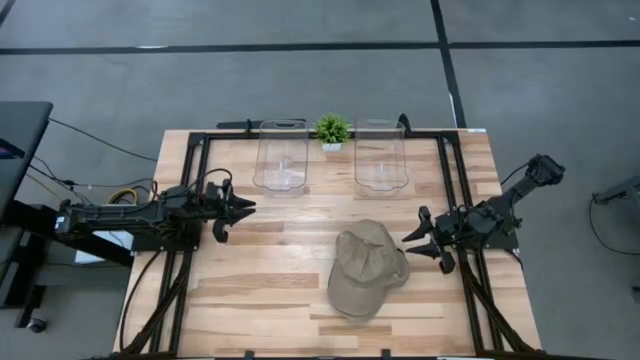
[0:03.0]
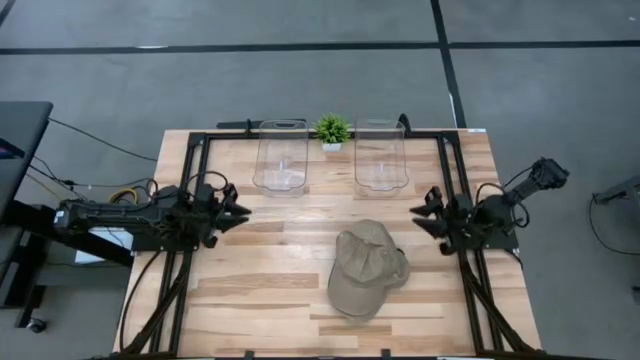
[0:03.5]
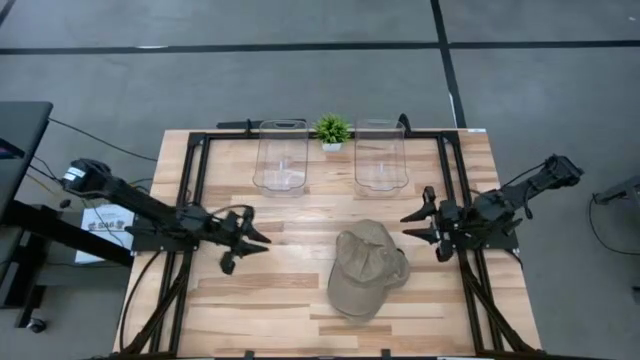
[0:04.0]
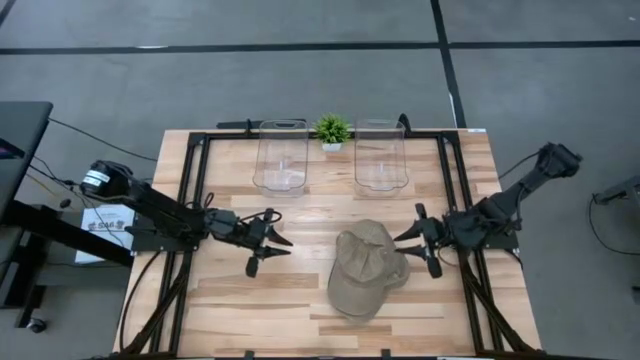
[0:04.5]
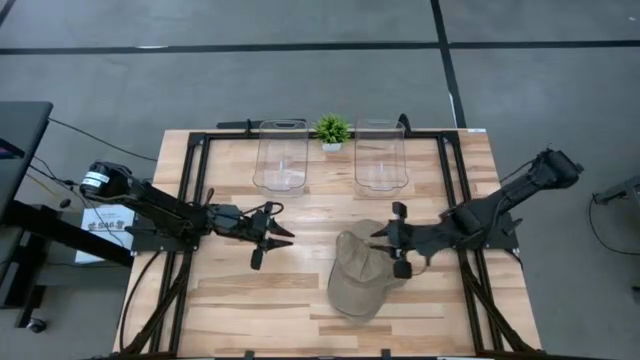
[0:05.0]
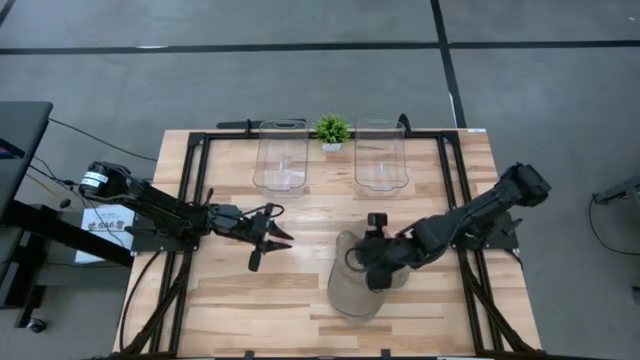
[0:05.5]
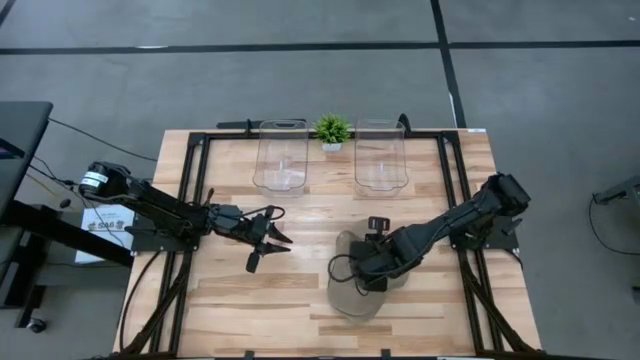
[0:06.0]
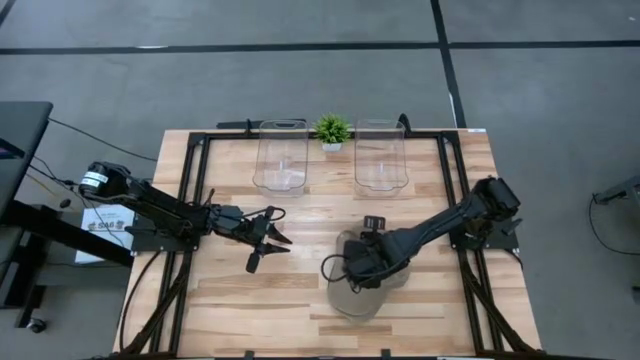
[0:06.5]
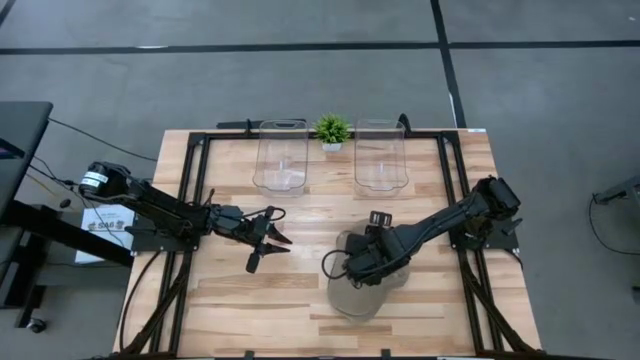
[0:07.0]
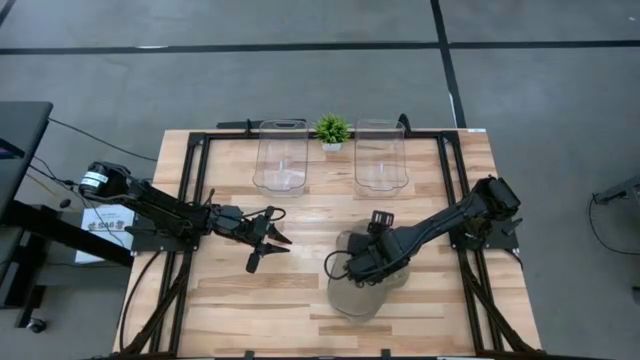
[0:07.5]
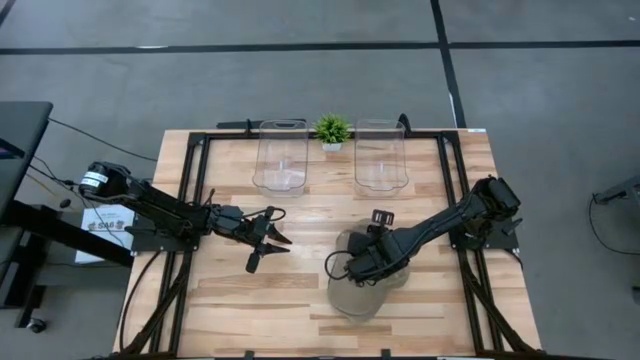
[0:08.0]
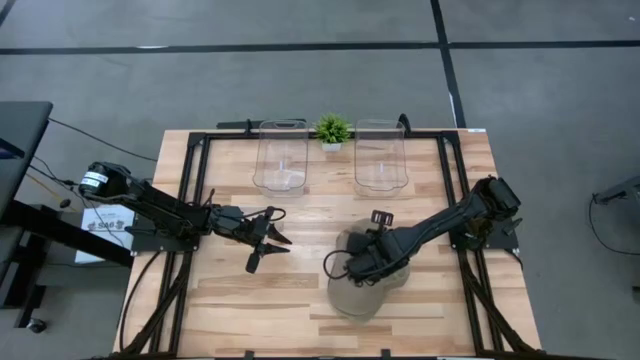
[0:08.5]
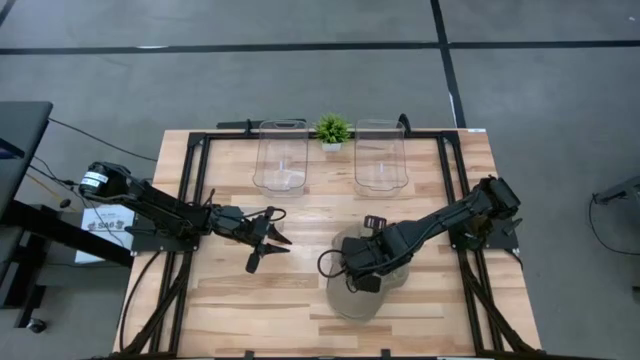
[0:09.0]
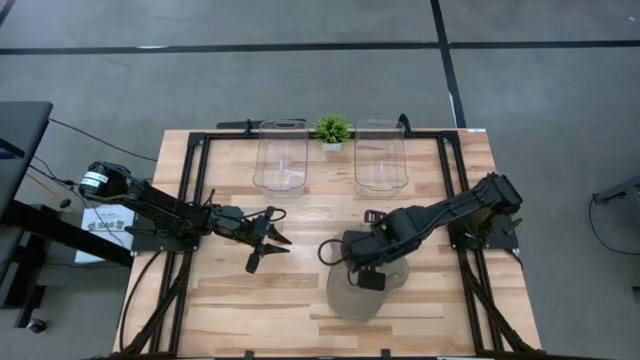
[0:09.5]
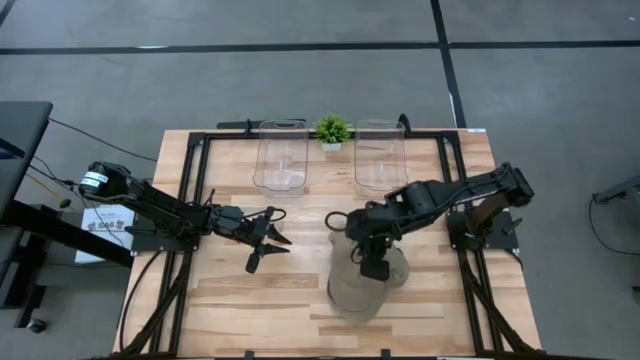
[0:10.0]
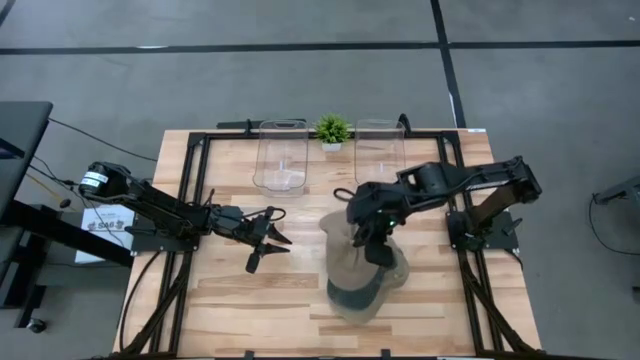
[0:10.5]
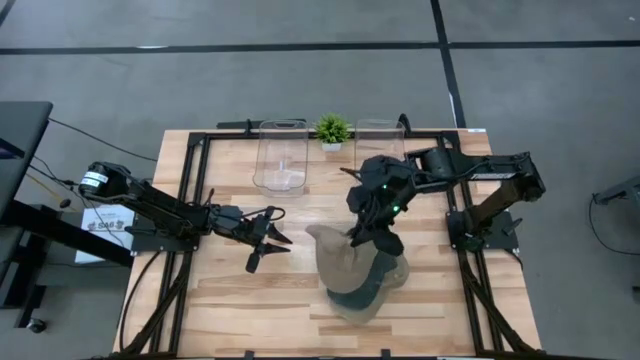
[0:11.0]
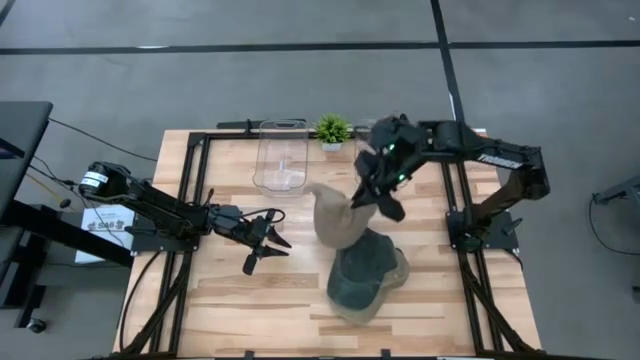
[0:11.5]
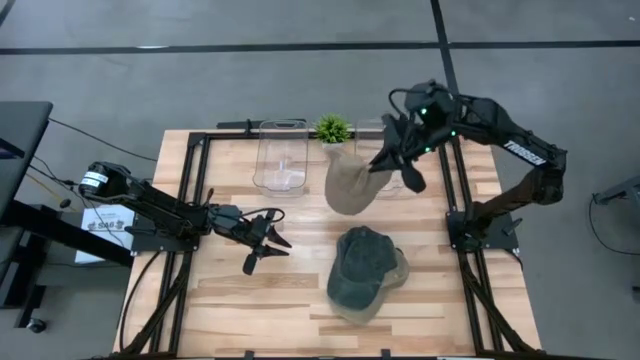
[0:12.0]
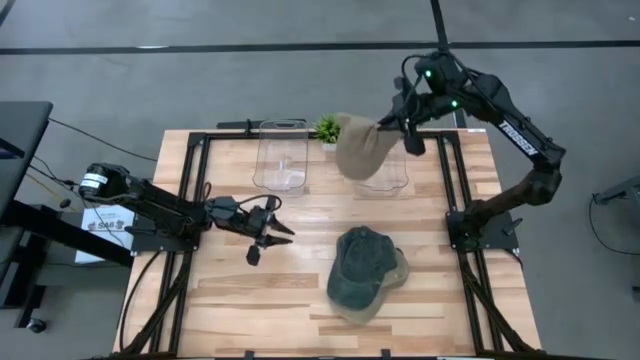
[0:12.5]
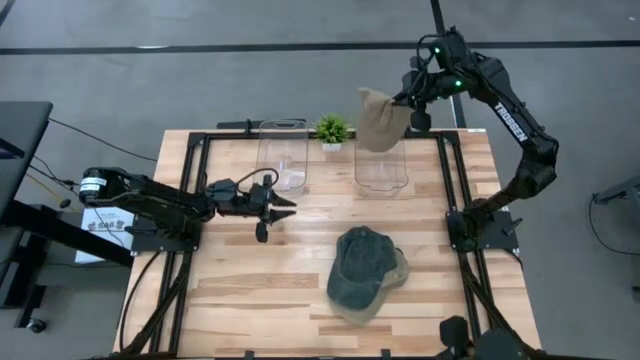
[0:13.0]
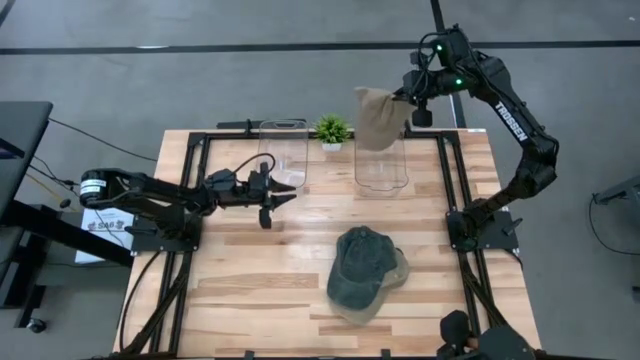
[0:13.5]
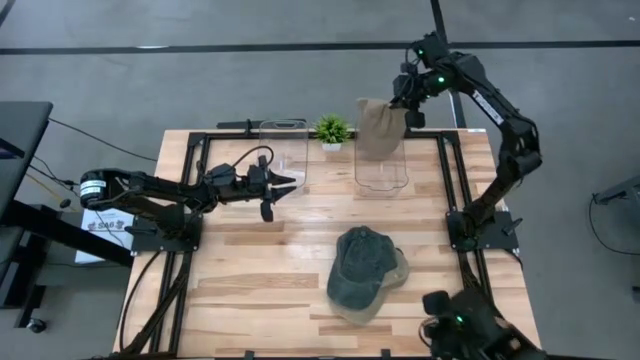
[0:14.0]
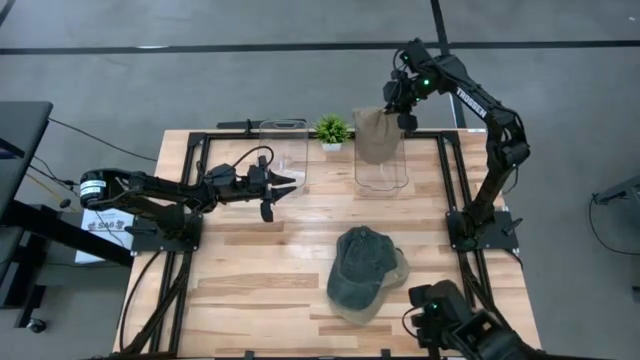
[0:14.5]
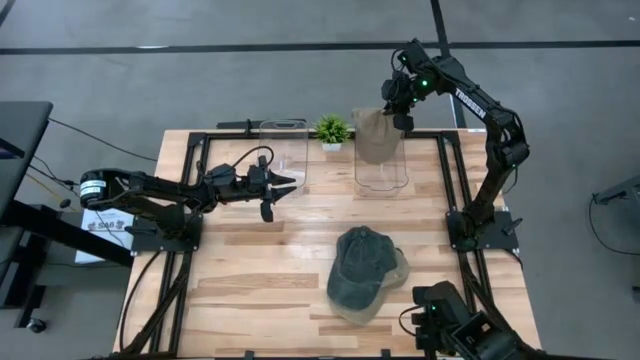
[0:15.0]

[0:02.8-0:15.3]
Task: Pick & Place hat
Put the top brown cap into the right transparent bin

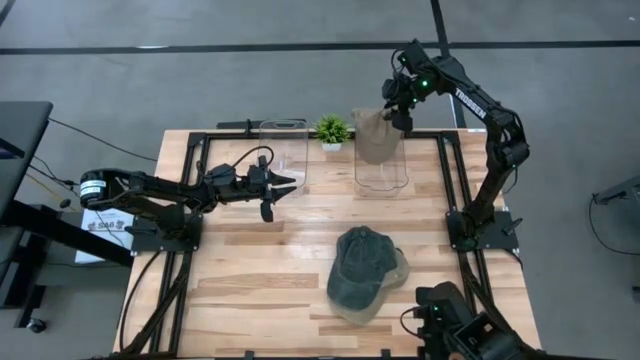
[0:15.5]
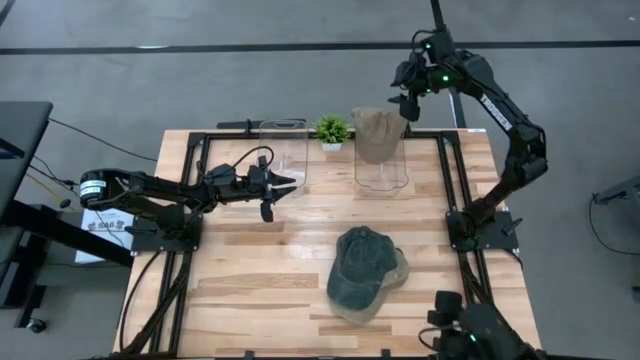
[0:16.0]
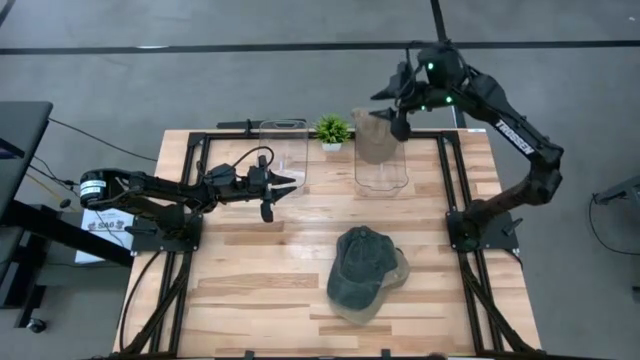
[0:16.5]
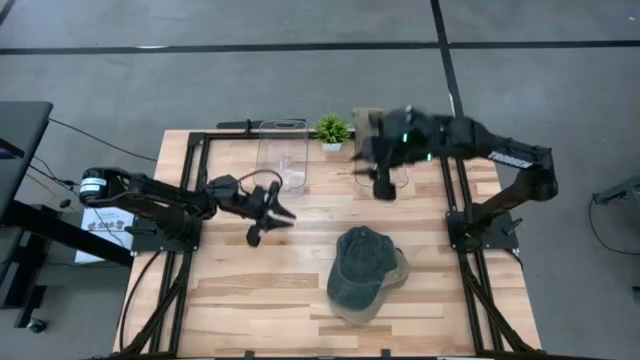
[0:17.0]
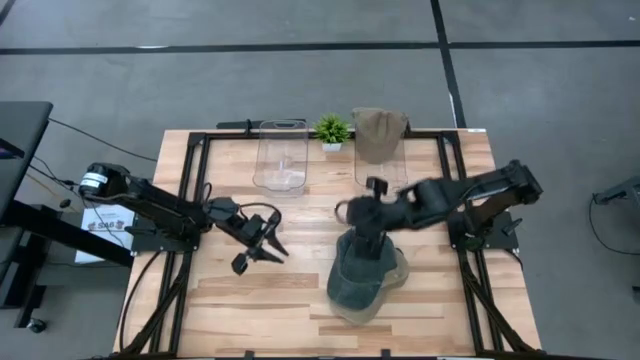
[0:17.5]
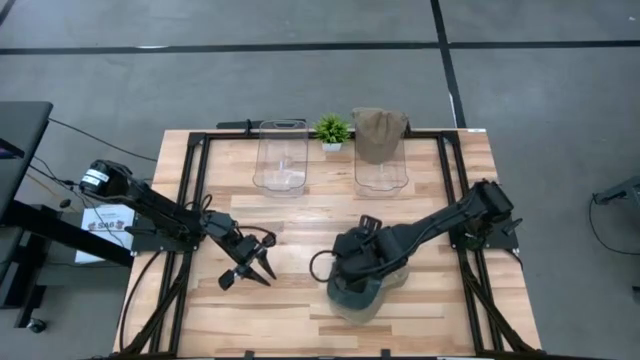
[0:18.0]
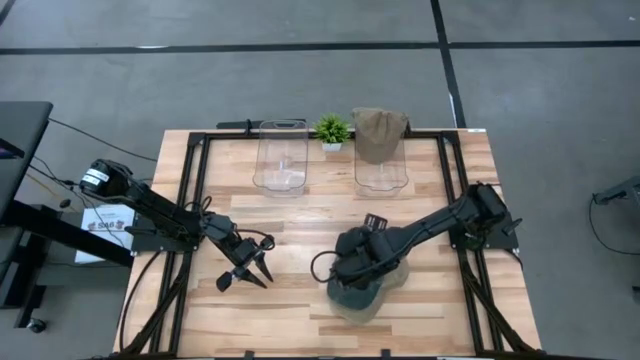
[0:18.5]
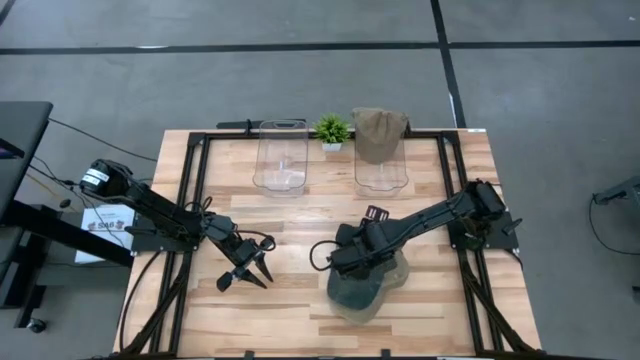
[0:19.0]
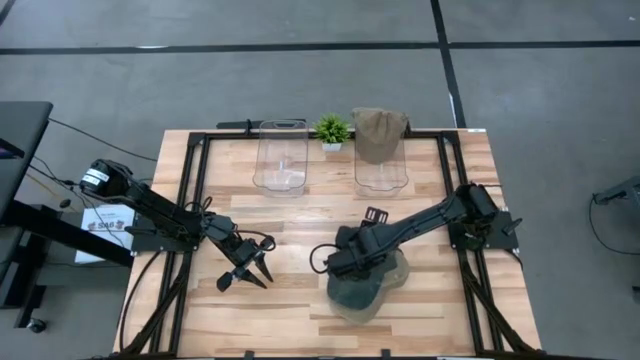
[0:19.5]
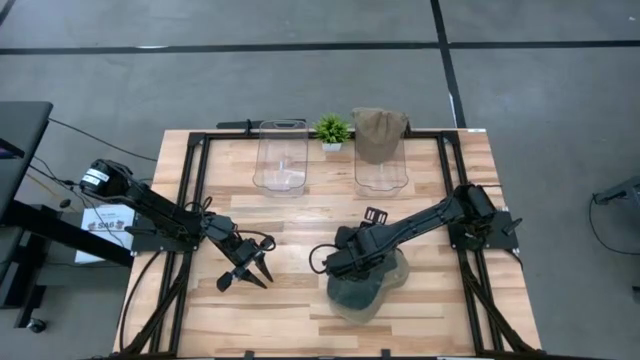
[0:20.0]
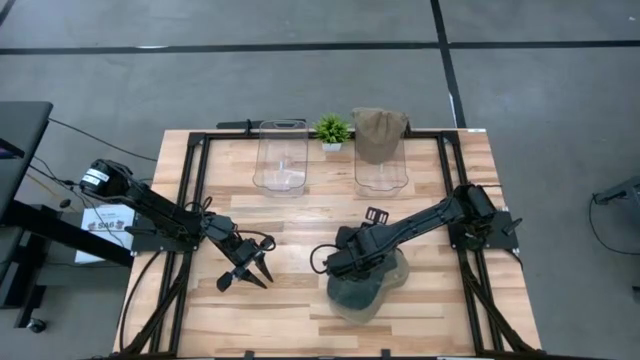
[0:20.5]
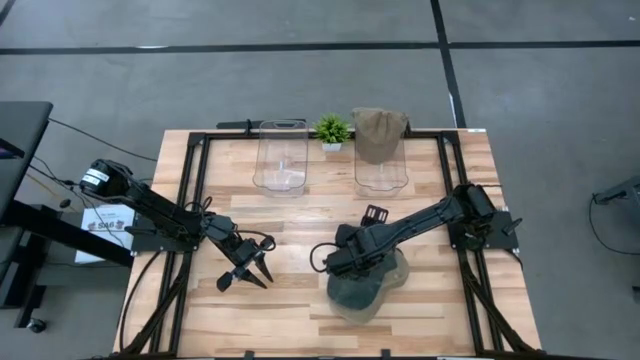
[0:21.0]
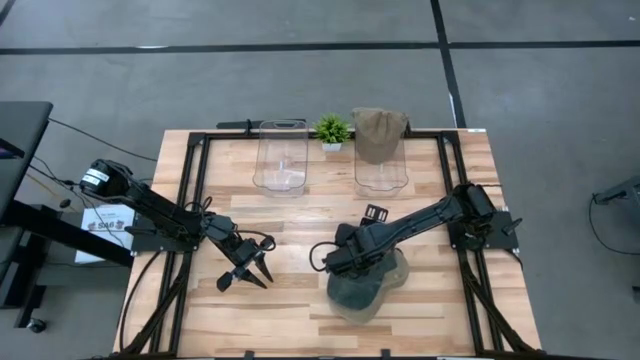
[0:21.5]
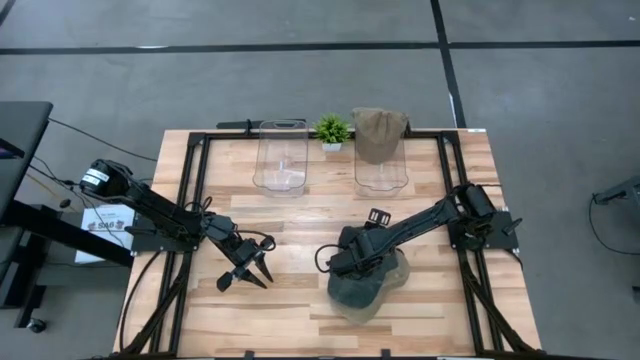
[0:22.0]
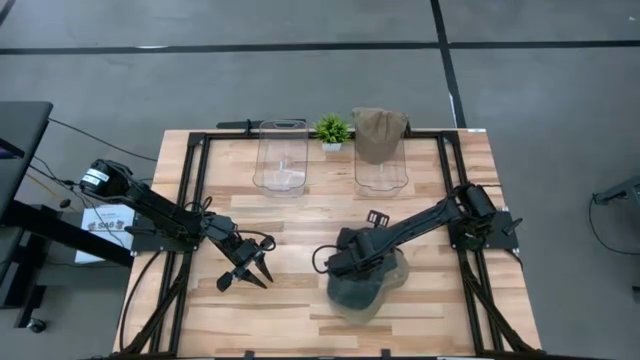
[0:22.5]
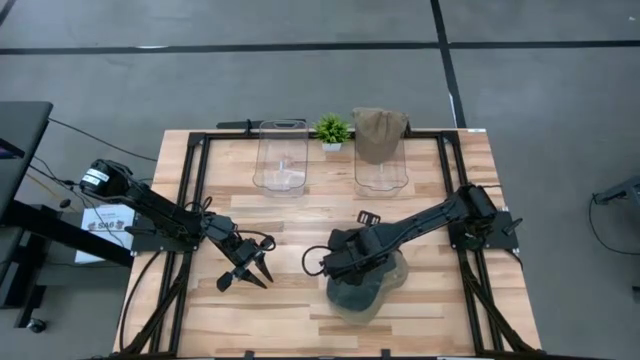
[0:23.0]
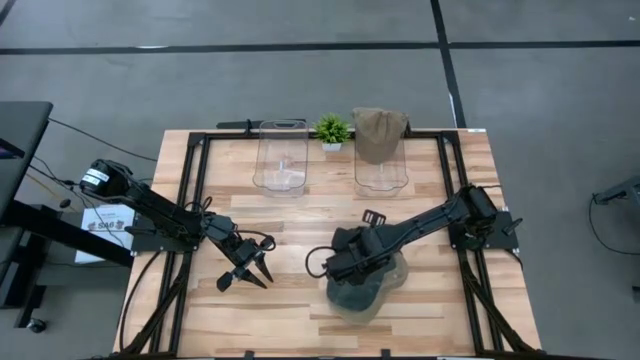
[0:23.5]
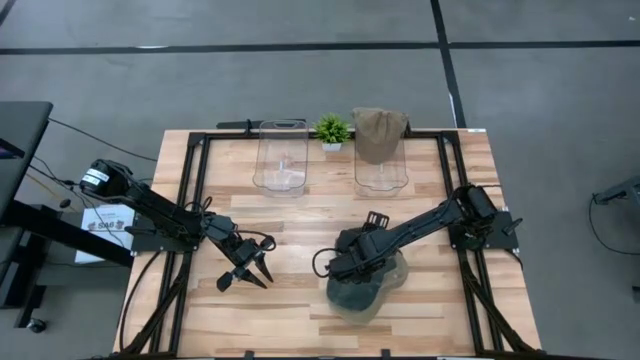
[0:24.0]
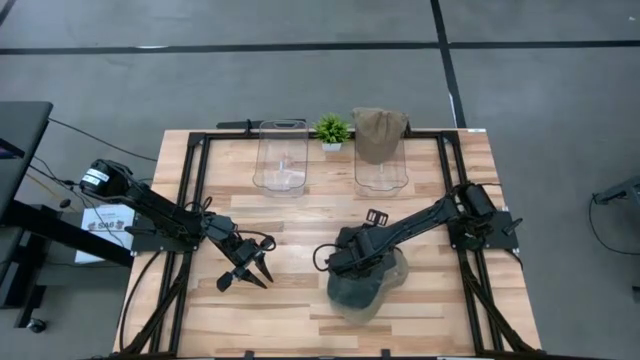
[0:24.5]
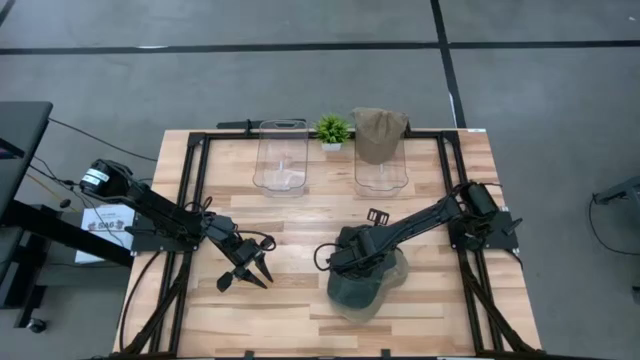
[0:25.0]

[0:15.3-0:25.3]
Put the top blue cap into the left transparent bin
